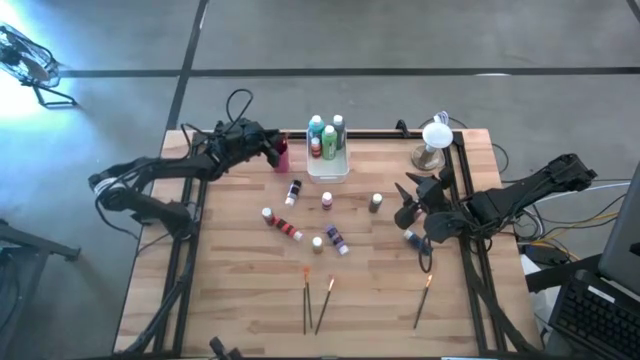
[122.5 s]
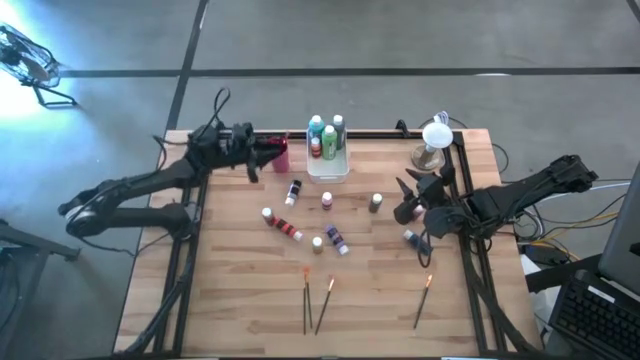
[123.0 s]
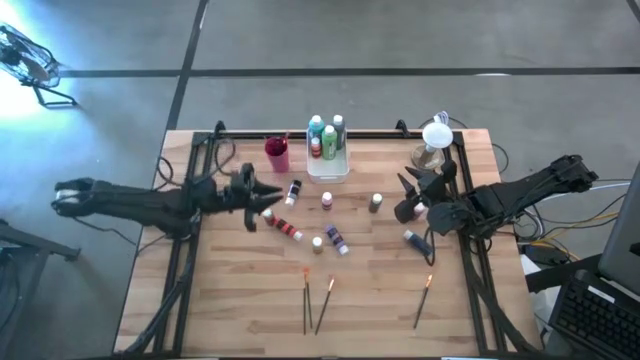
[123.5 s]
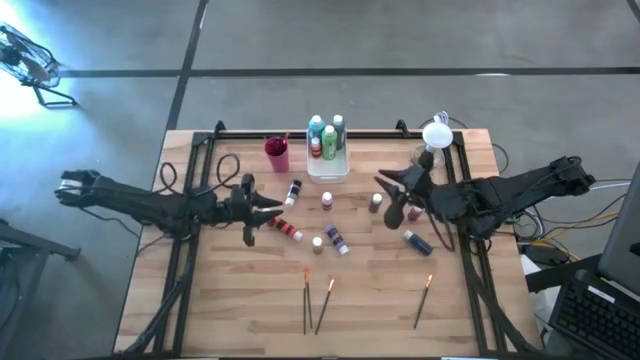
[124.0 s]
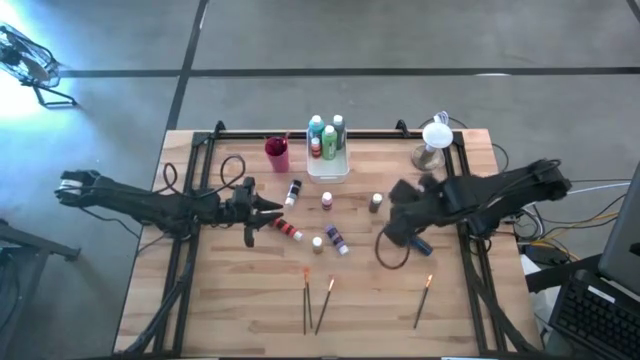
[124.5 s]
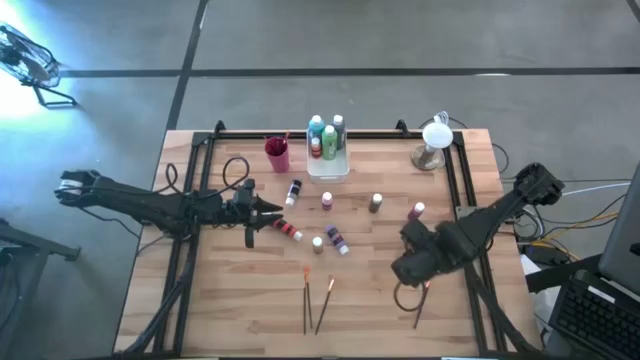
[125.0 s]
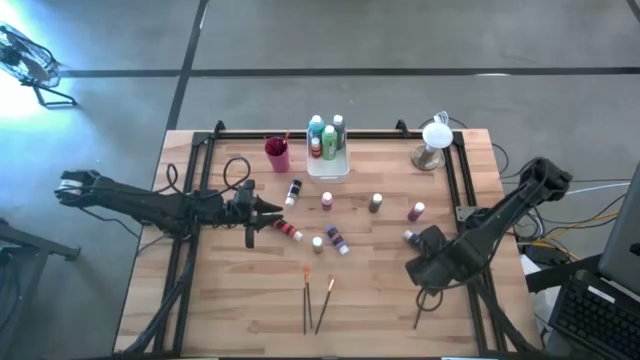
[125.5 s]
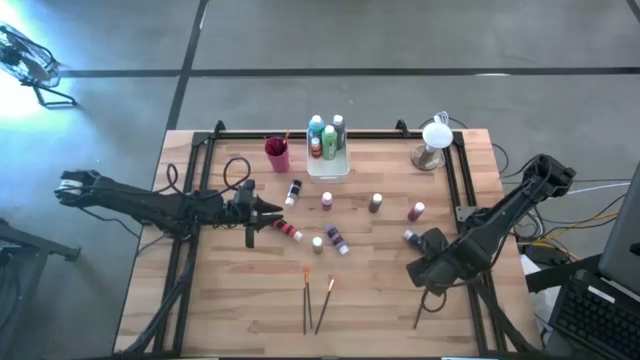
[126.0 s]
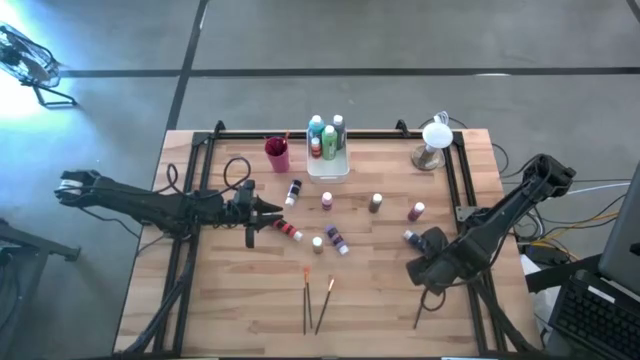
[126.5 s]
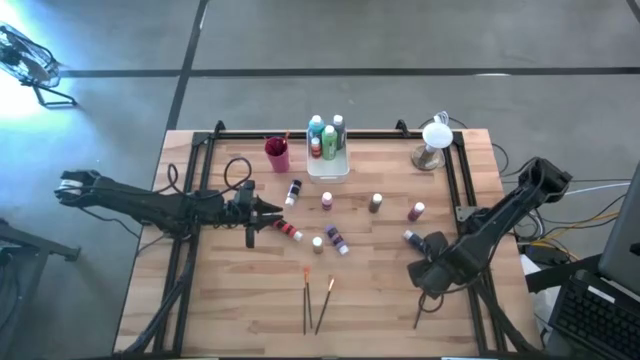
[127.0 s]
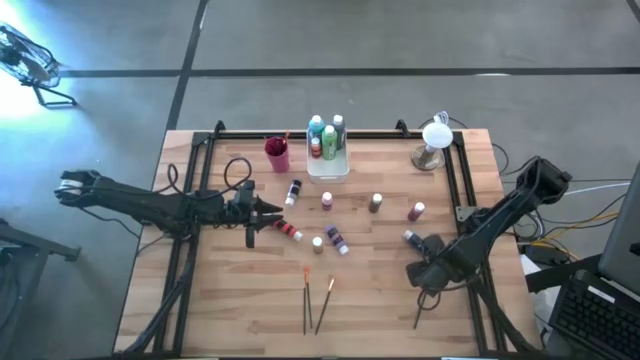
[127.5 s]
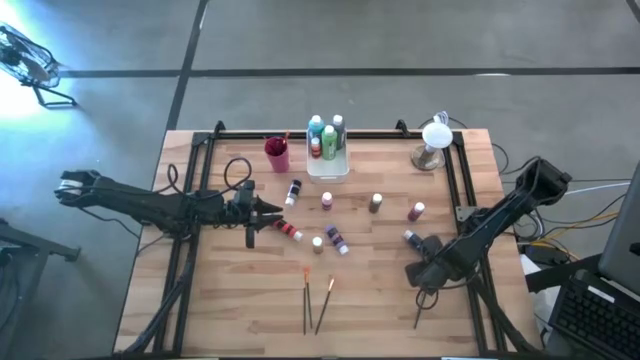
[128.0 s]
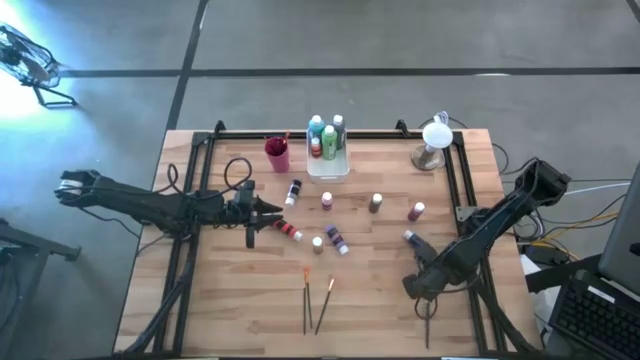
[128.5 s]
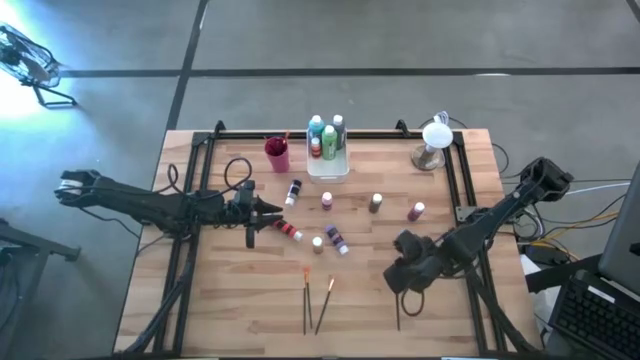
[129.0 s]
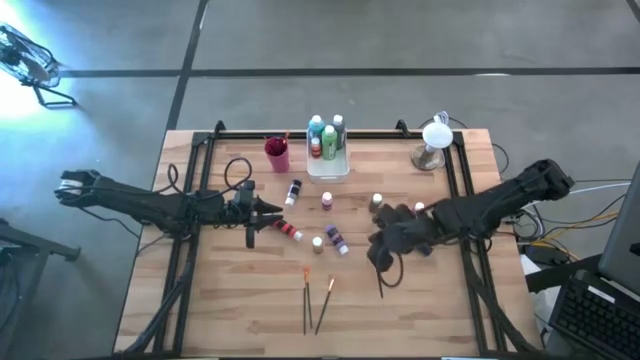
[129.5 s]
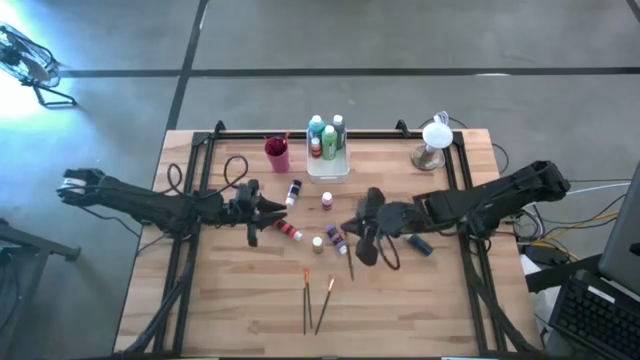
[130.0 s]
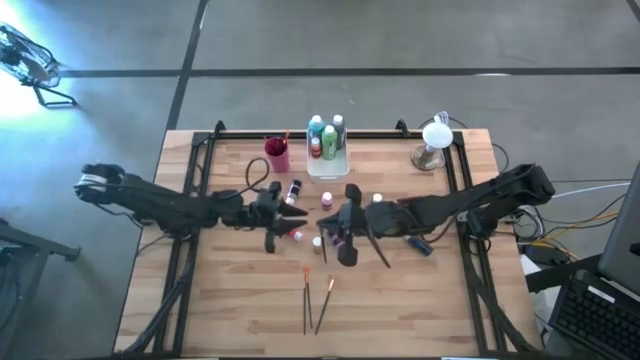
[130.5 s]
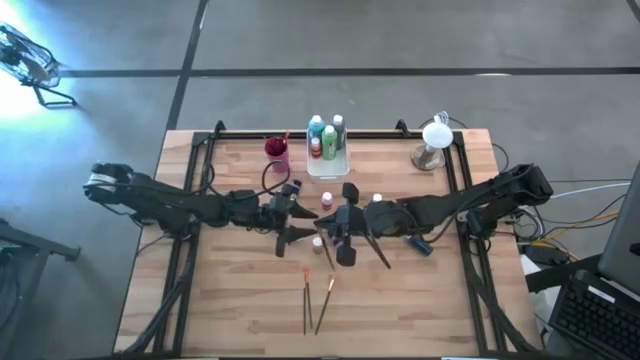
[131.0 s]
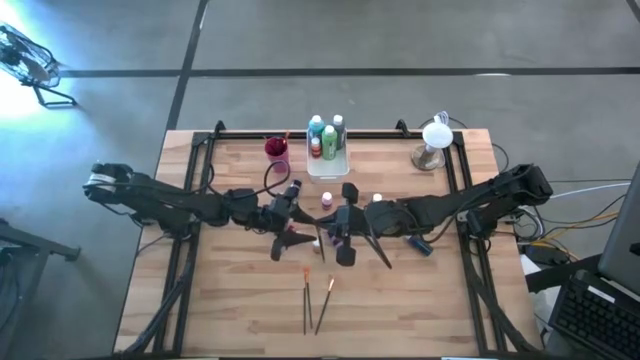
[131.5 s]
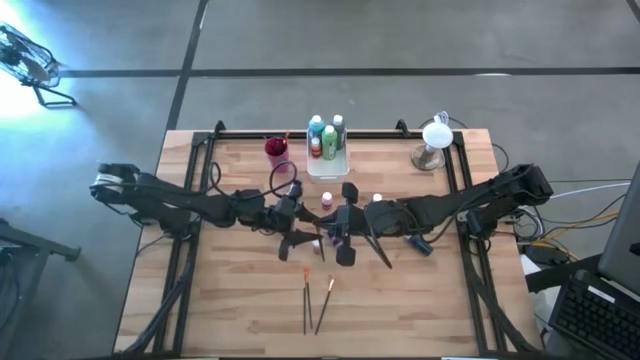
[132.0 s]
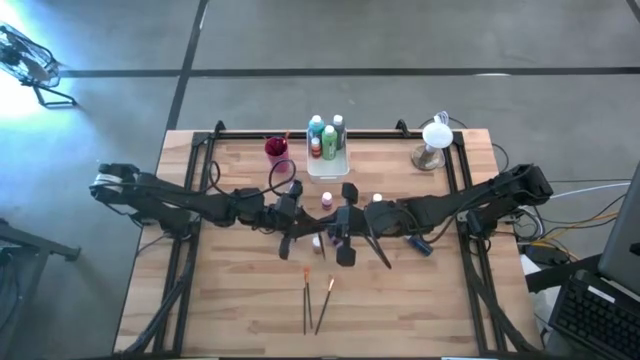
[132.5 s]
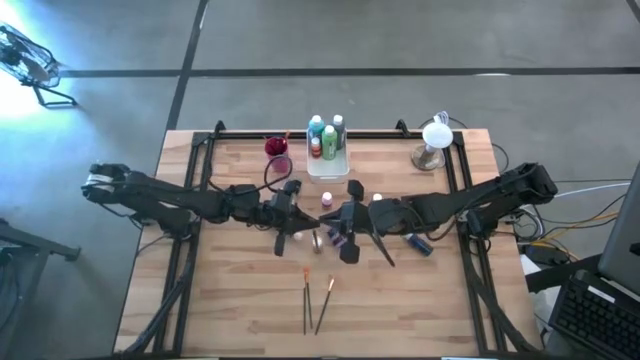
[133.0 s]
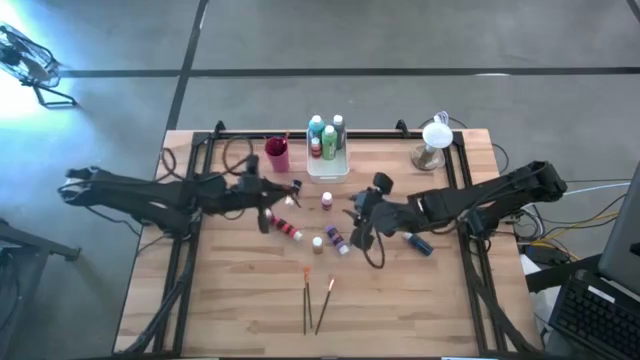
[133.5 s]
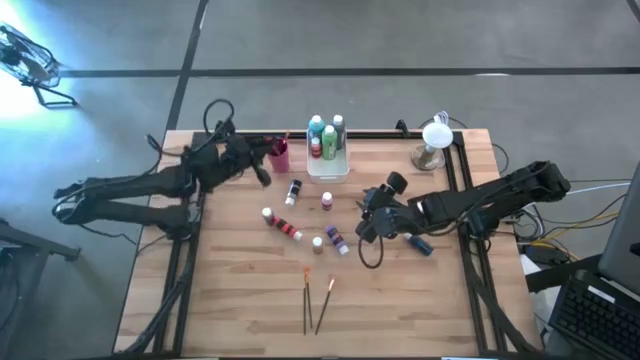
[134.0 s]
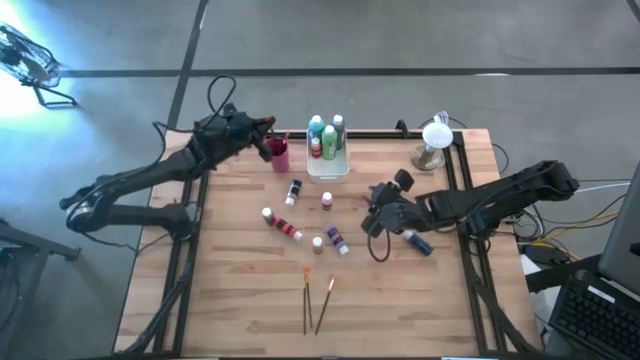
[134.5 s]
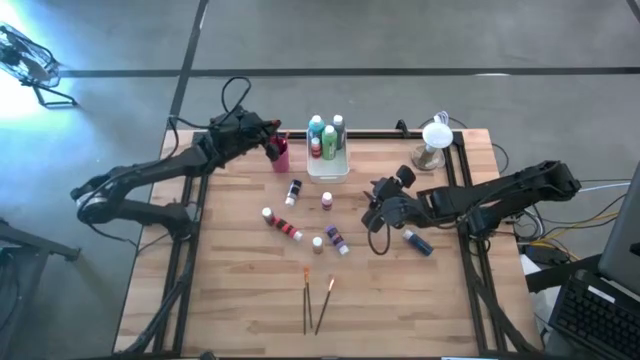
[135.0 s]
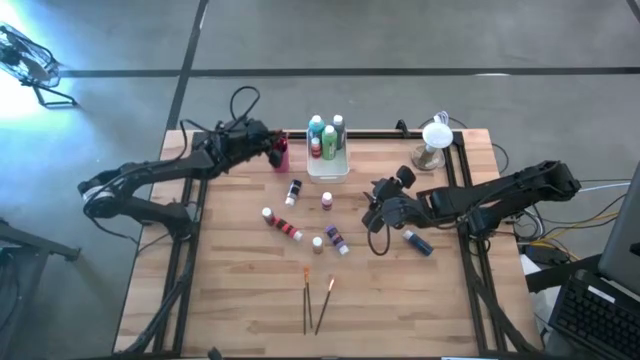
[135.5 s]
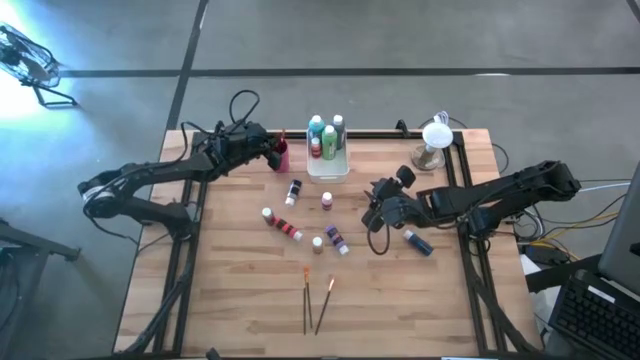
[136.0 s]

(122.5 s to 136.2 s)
Task: Pick & Place Paint Supplies
Put the gold paint brush into the pink cup

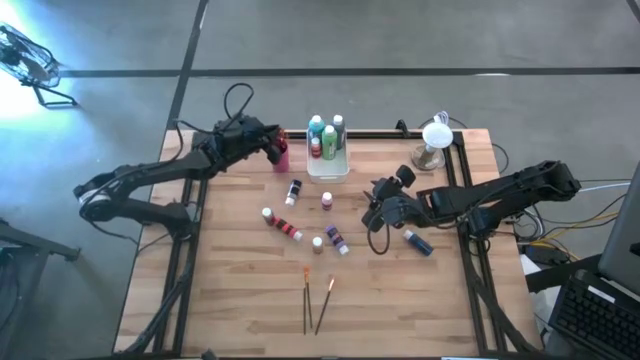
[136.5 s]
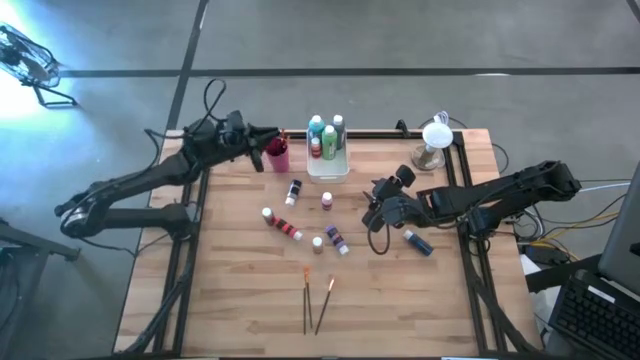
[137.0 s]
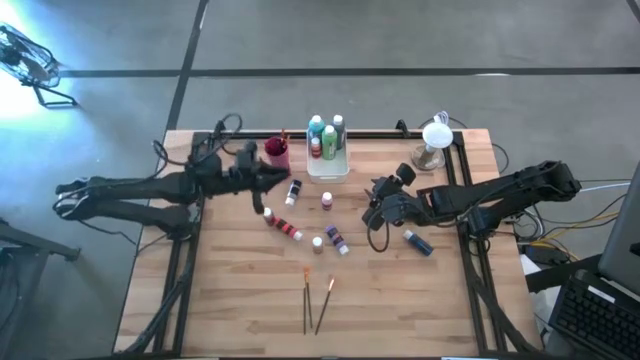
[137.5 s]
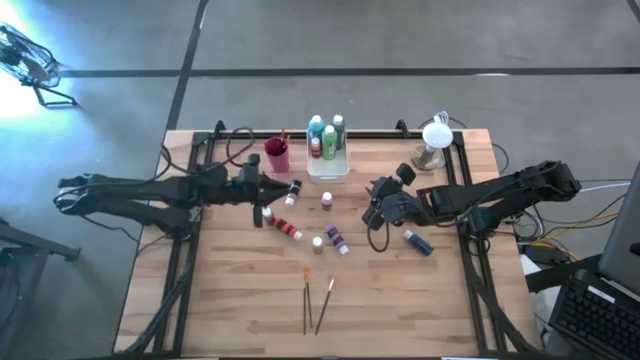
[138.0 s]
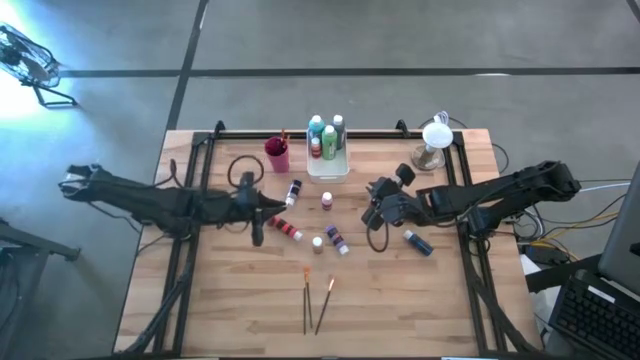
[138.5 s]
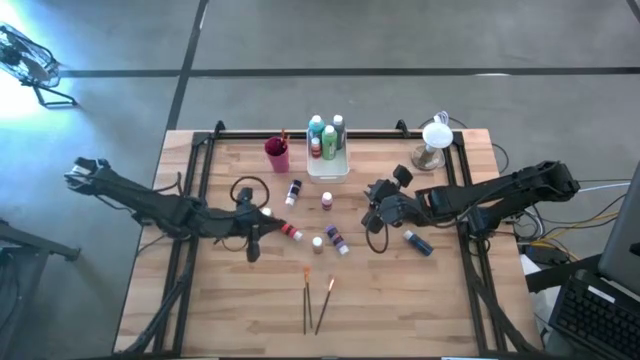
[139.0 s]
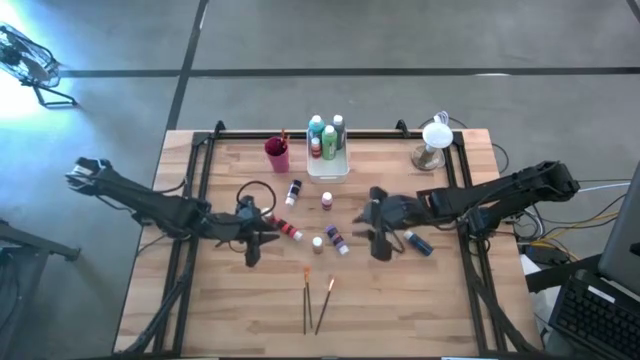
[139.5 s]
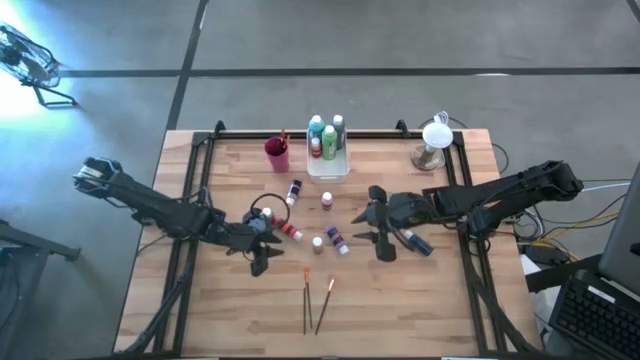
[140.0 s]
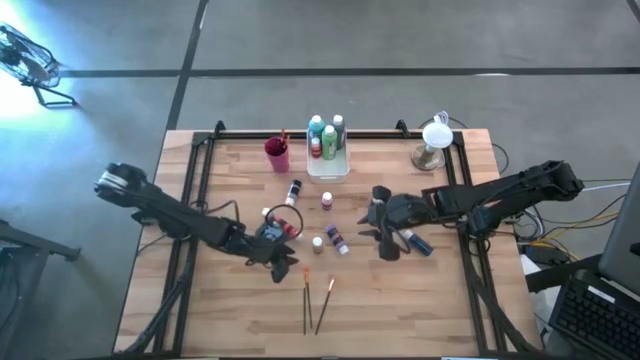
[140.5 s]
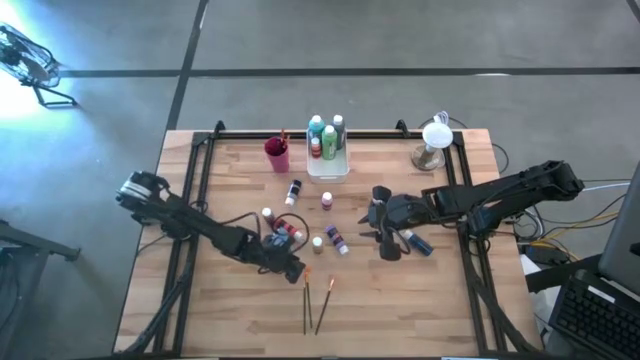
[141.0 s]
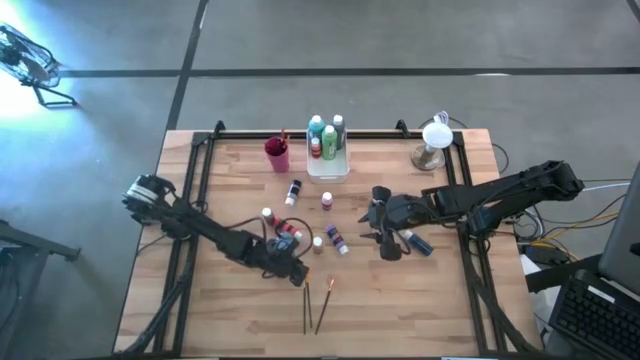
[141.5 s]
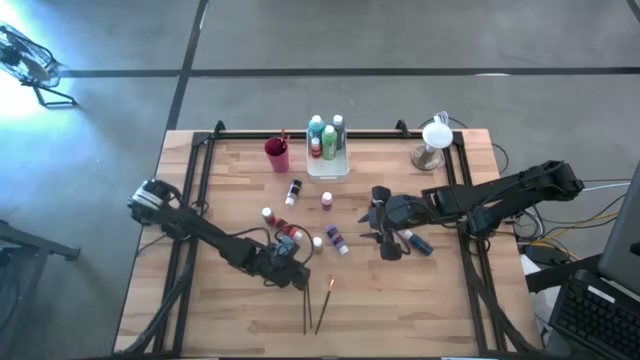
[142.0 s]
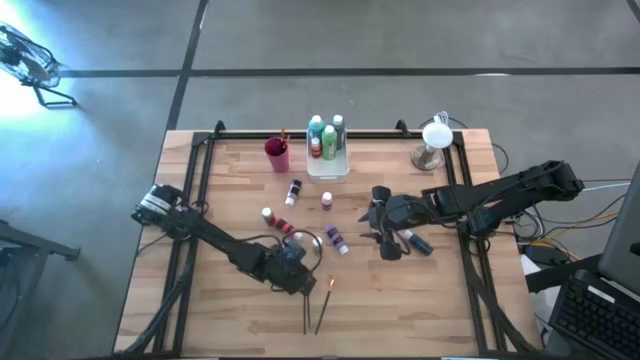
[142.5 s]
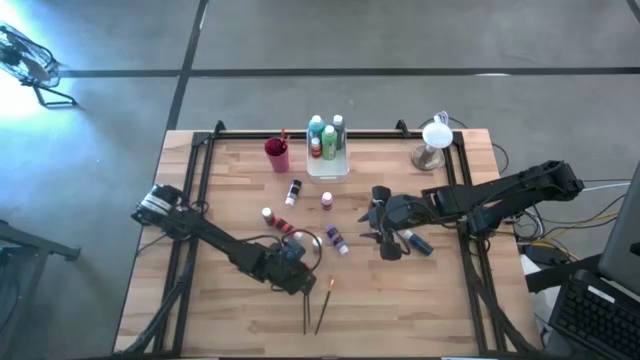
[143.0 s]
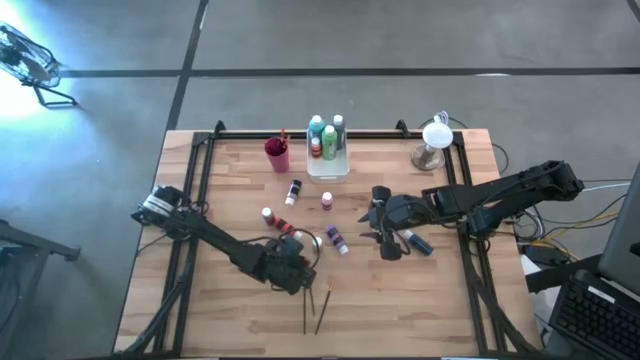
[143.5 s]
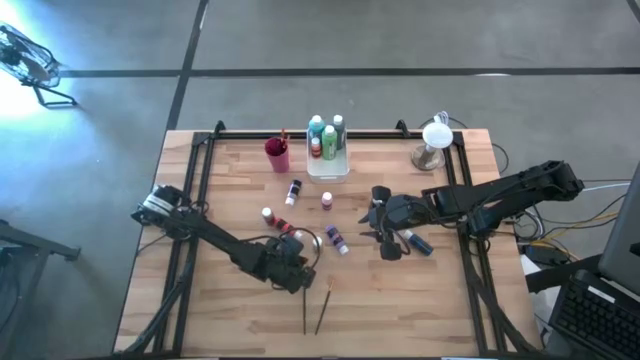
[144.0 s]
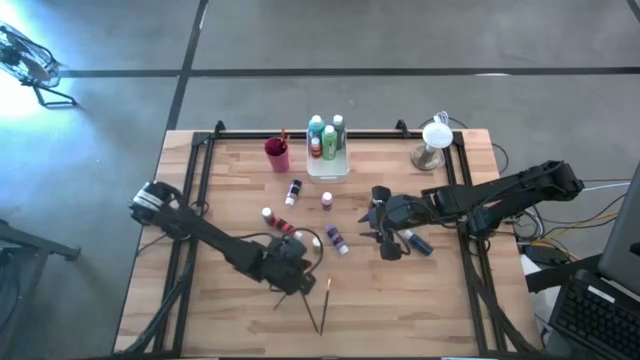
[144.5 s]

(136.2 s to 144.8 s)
Put the gold paint brush into the pink cup
